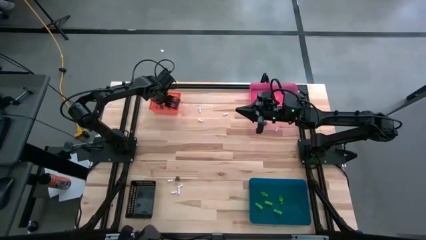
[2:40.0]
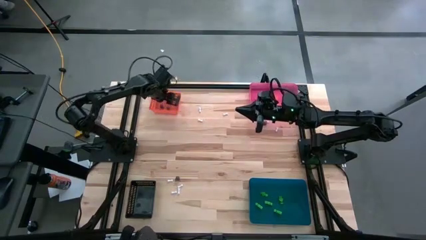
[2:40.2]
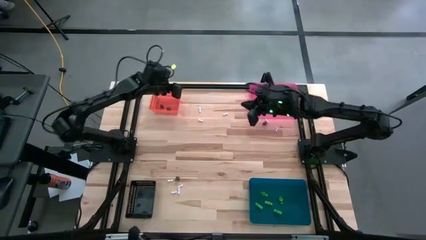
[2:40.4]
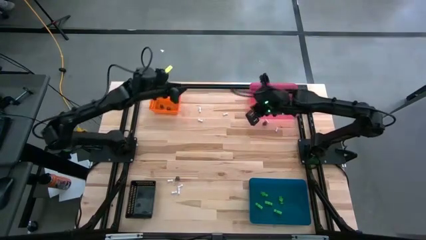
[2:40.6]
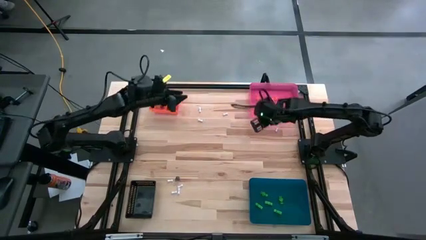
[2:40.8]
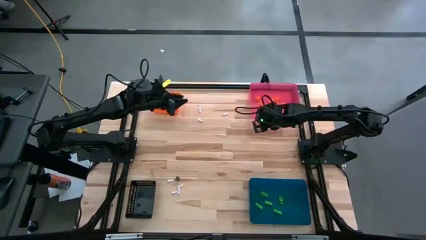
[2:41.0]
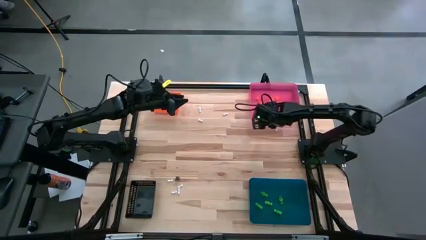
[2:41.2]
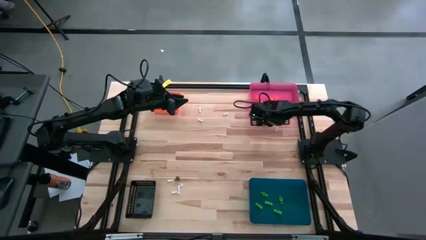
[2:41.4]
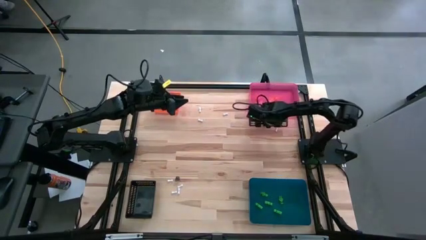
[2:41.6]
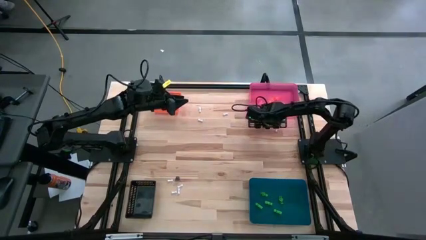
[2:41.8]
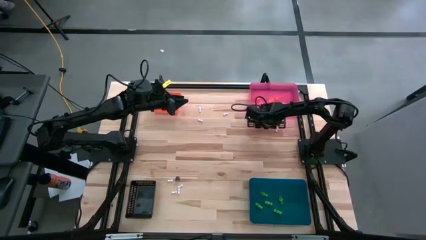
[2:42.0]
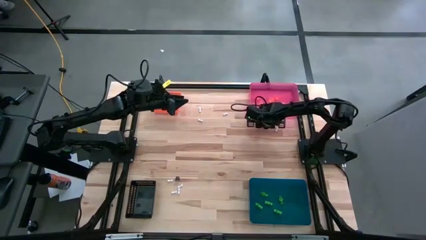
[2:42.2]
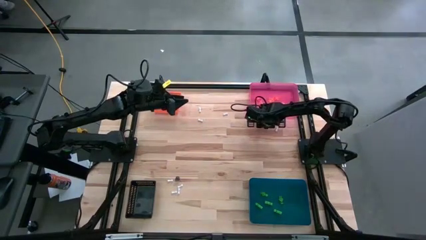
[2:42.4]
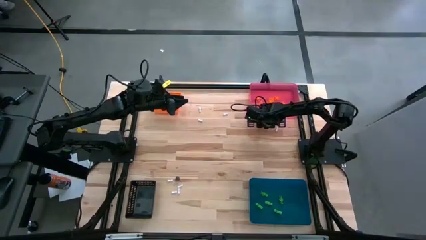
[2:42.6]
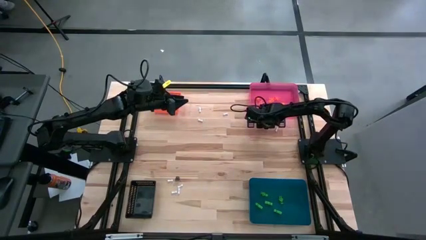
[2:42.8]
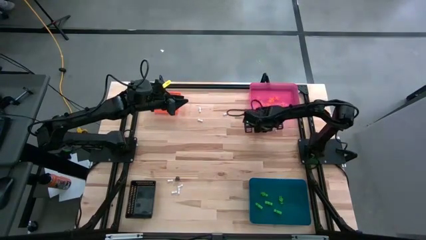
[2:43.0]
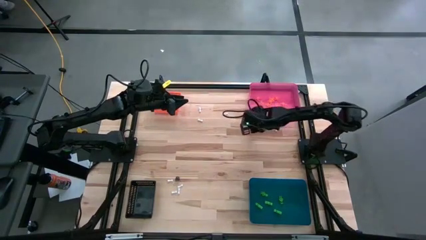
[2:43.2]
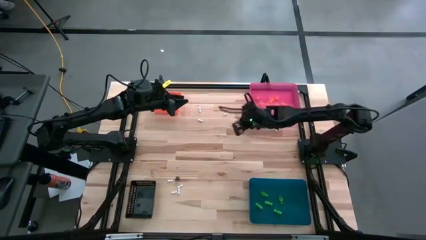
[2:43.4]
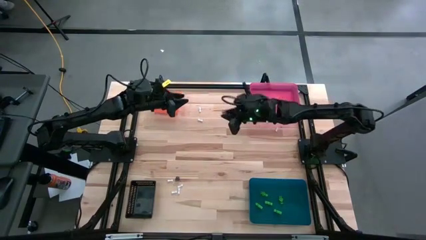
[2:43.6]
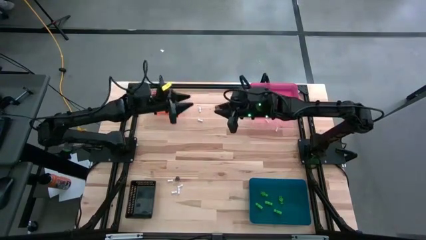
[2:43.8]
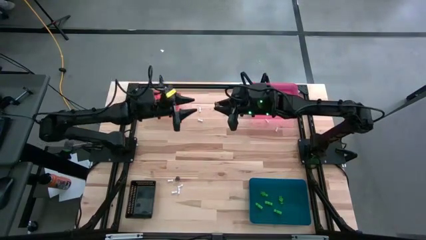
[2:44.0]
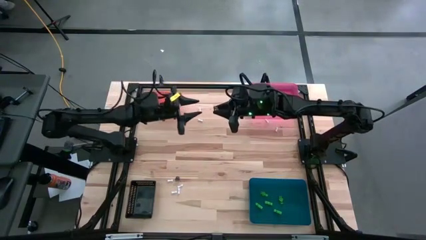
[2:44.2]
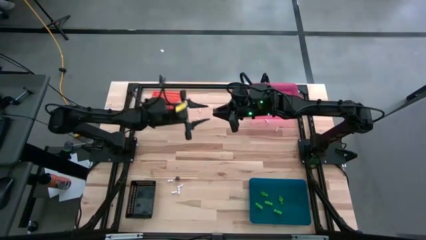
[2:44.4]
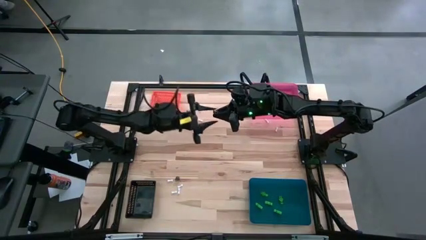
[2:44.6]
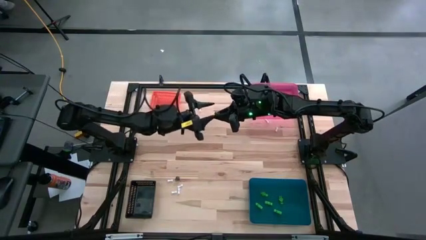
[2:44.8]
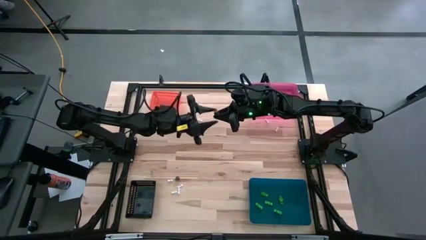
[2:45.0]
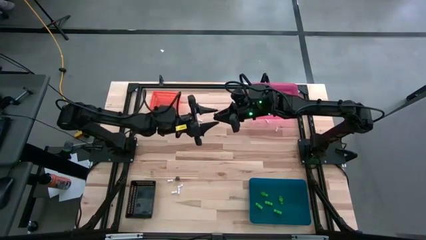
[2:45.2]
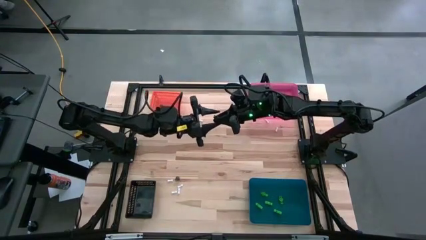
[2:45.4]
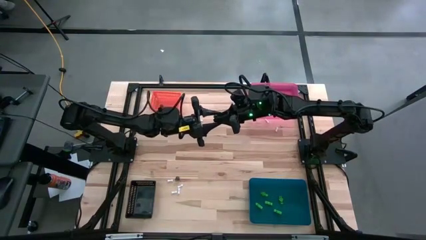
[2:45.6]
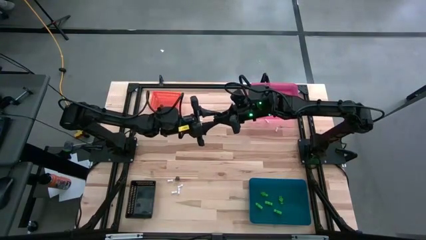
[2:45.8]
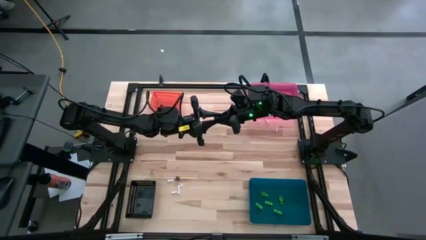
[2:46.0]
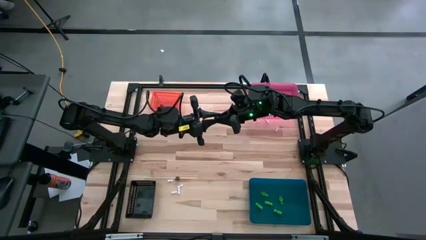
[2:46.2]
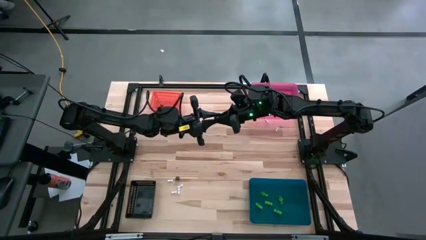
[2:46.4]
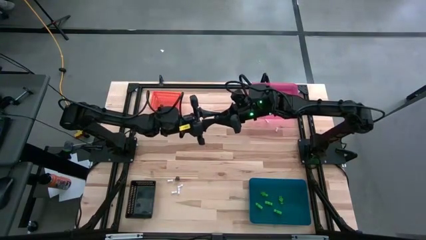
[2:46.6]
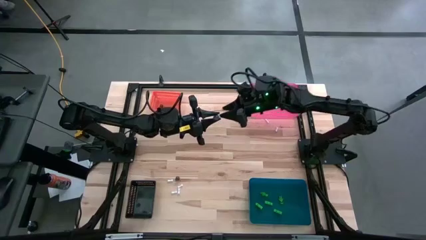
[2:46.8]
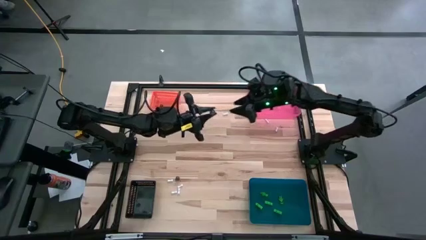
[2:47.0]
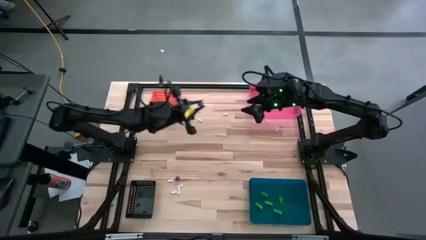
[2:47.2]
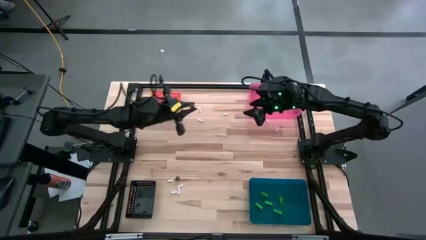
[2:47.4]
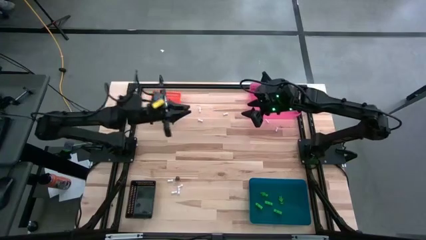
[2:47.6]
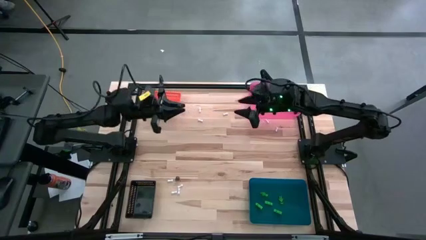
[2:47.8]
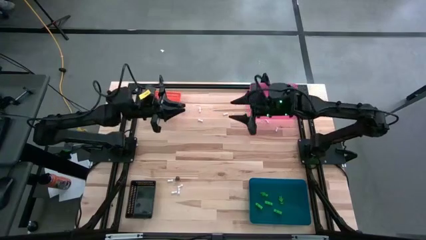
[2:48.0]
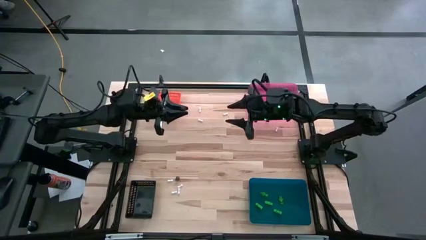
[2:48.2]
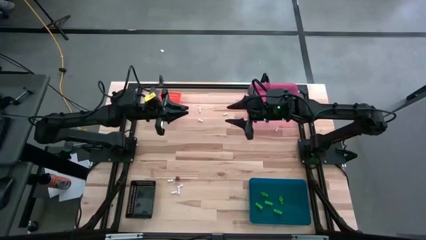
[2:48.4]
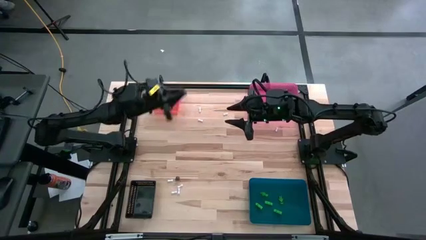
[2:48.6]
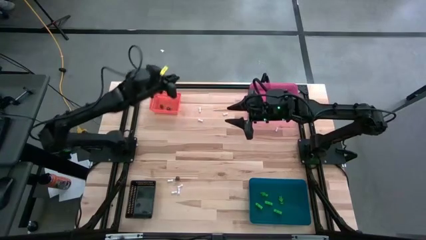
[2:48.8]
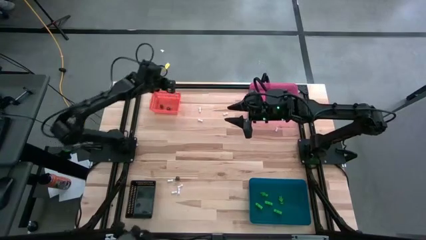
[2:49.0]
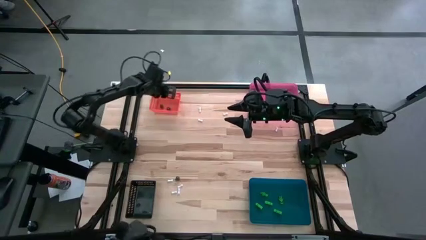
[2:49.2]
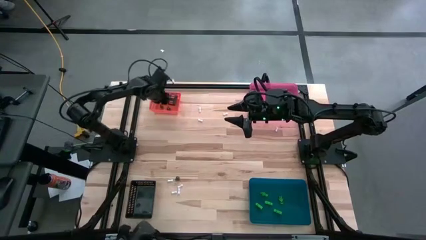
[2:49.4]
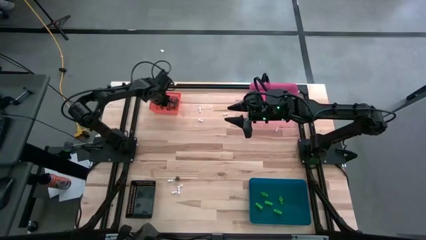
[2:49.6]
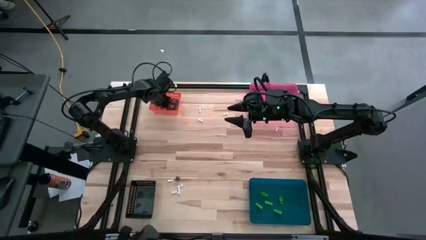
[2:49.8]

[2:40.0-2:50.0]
Task: Sort Halloween decoration
Put the top black skull toy into the orange bin

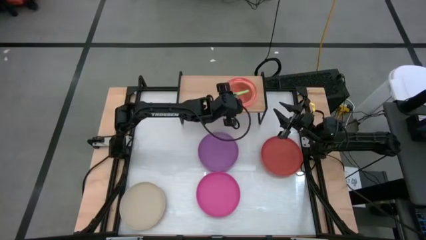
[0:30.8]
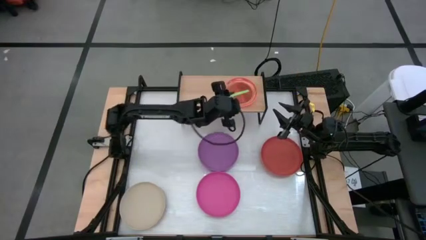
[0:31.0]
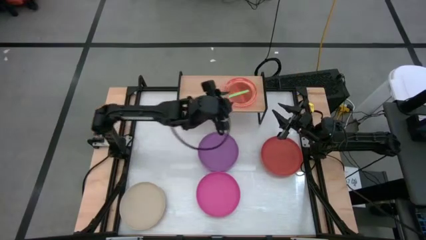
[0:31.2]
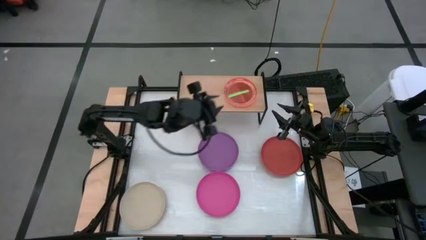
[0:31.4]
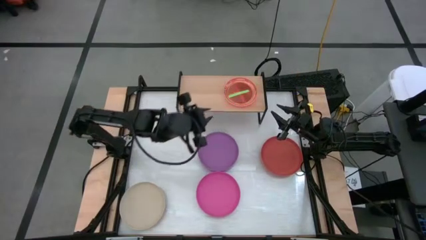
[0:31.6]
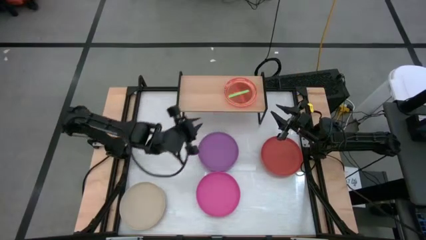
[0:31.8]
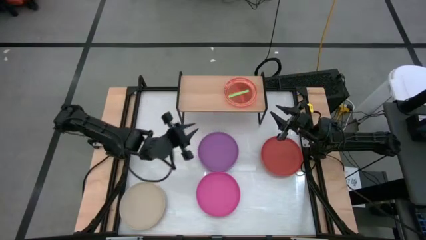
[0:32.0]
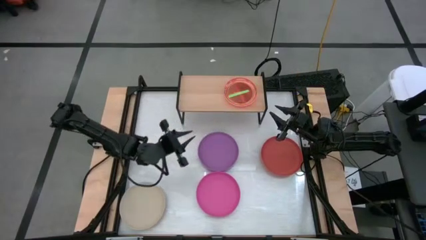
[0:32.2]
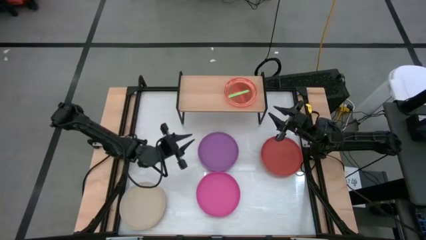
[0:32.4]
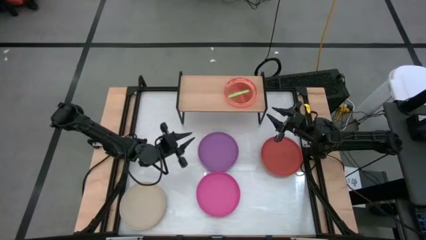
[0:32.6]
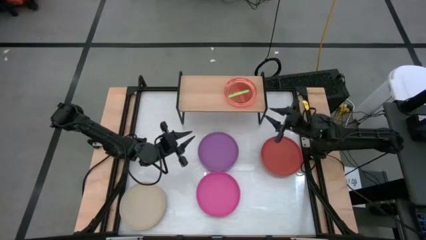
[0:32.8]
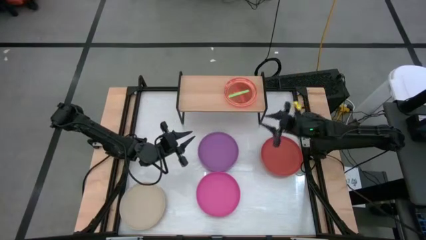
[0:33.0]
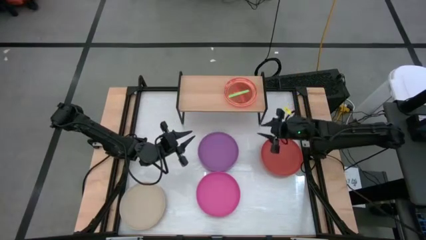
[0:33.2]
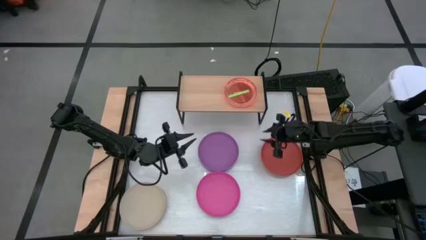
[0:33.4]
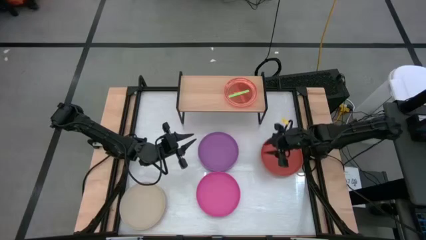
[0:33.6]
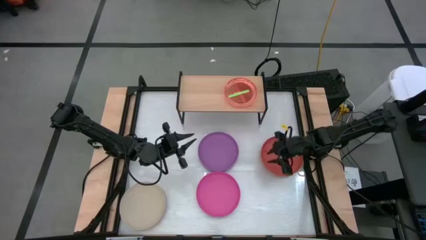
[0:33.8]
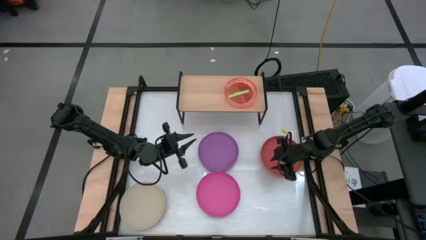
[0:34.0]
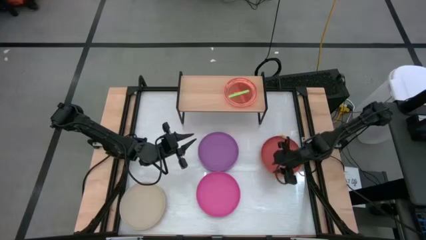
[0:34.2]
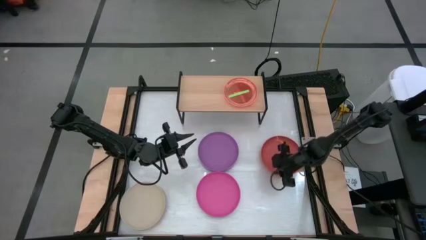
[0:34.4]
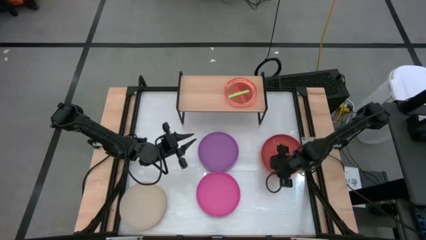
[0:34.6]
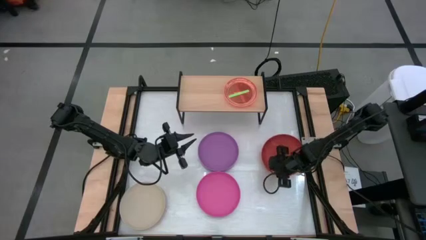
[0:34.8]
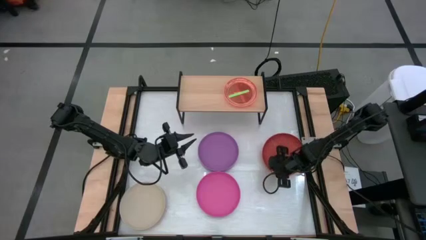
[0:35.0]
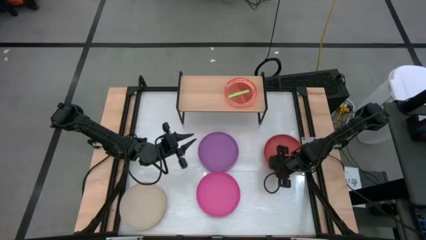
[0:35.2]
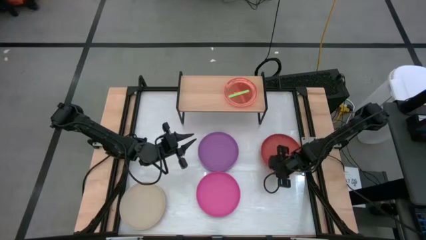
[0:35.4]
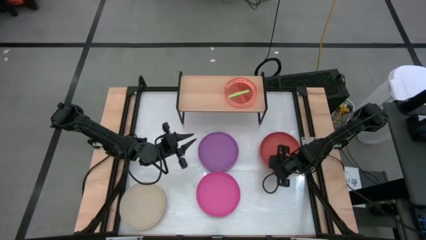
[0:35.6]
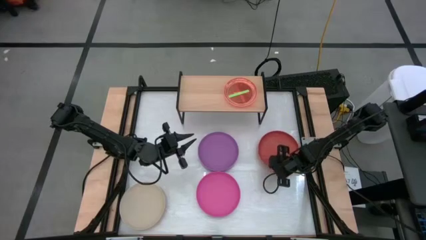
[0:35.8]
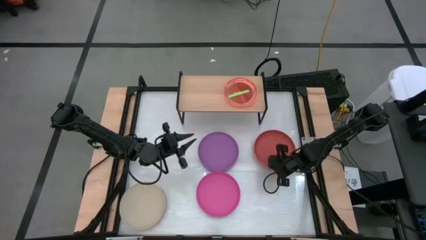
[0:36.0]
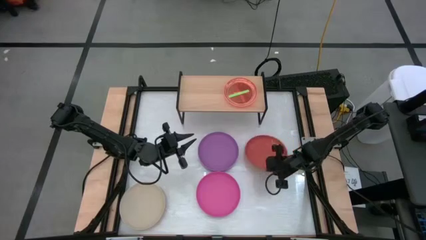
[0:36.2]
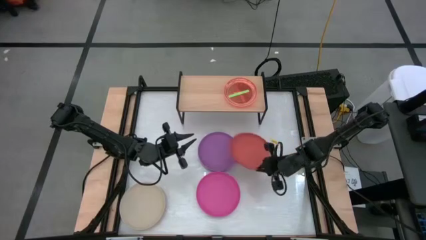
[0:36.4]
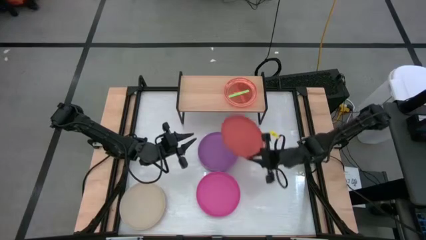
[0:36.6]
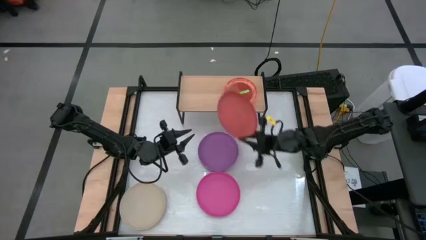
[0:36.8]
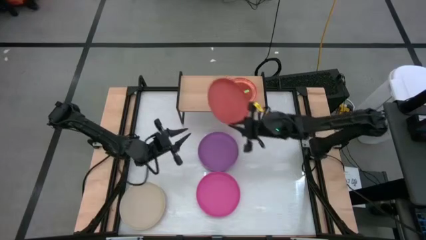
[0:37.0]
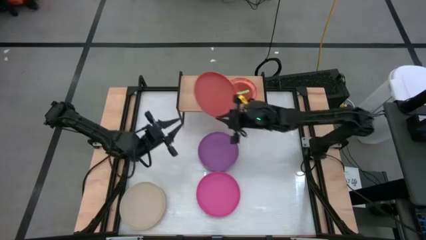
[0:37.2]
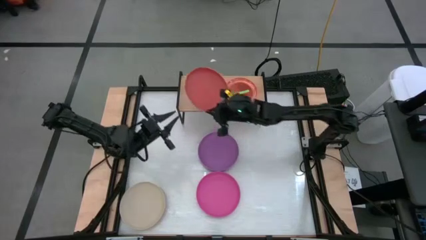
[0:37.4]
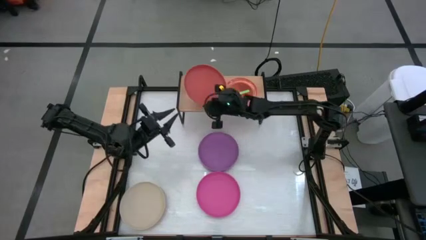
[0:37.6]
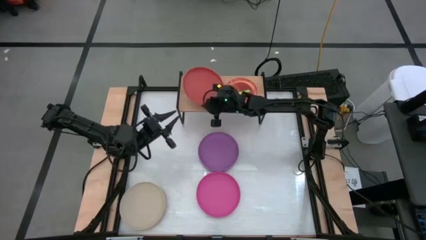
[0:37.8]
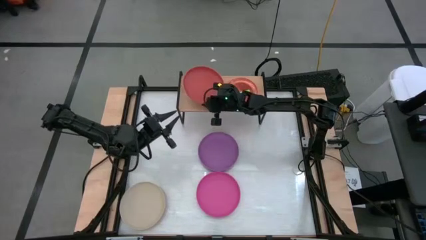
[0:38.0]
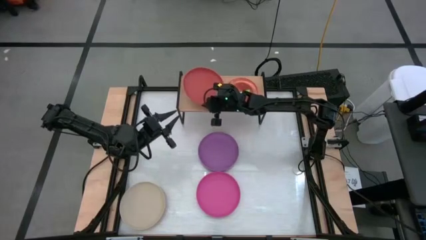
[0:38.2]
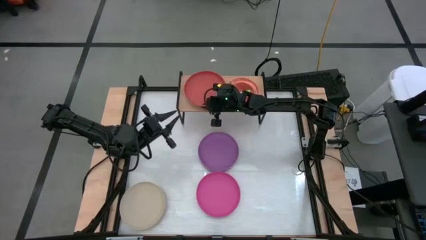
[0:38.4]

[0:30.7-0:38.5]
Task: Place and stack plates onto a shelf
Put the orange plate on the shelf
